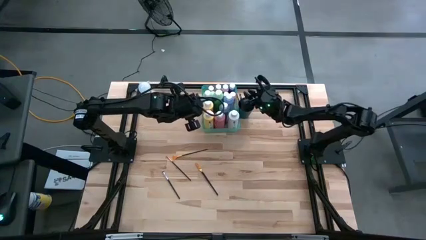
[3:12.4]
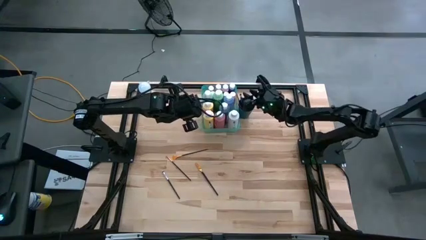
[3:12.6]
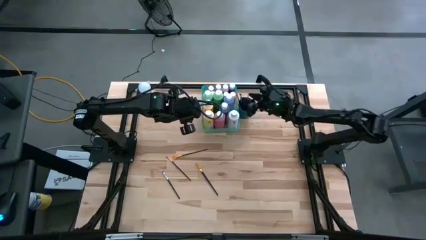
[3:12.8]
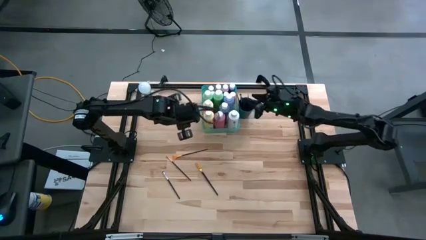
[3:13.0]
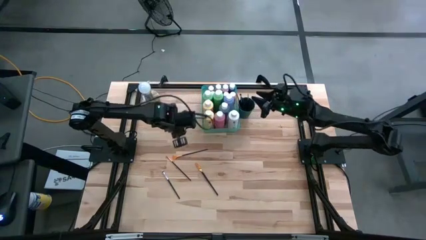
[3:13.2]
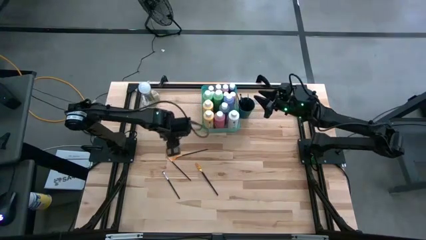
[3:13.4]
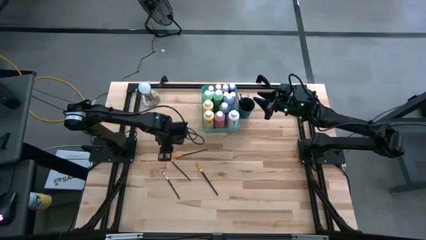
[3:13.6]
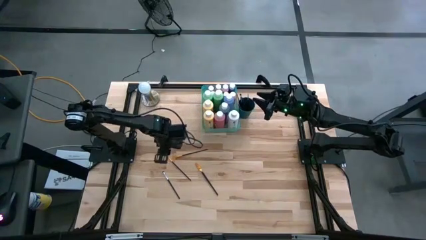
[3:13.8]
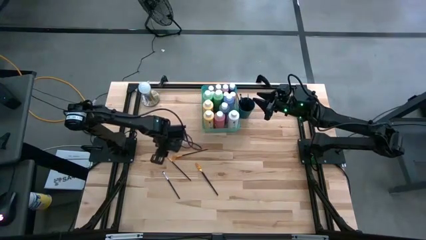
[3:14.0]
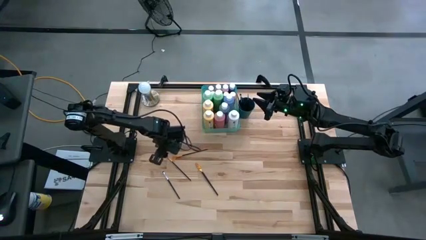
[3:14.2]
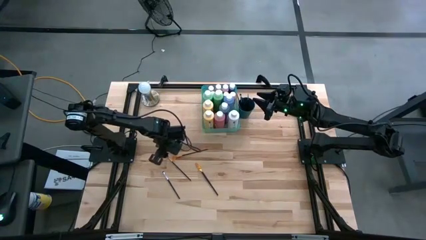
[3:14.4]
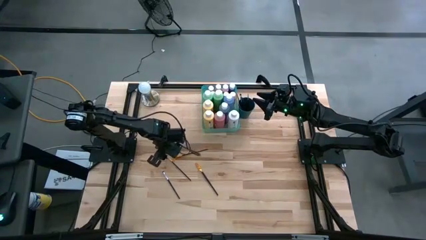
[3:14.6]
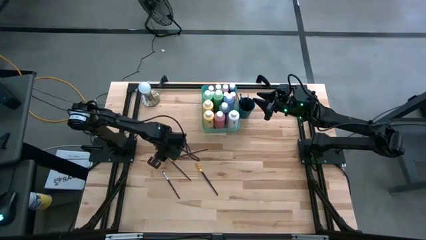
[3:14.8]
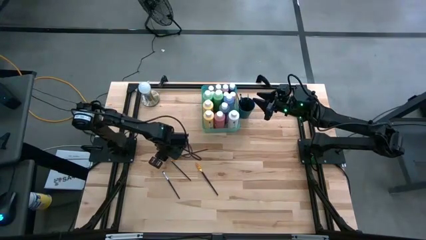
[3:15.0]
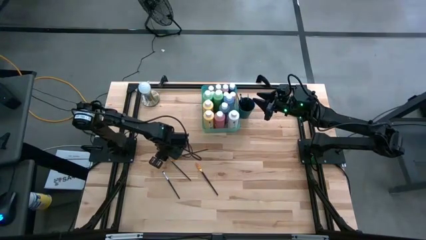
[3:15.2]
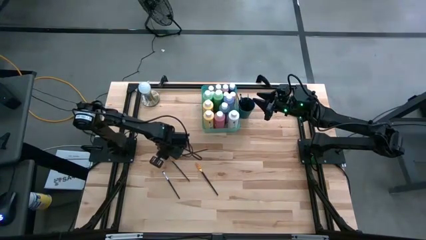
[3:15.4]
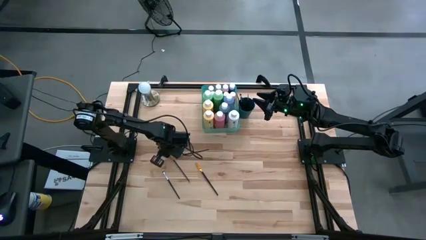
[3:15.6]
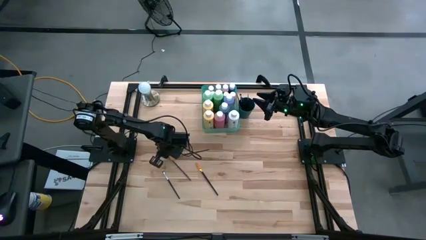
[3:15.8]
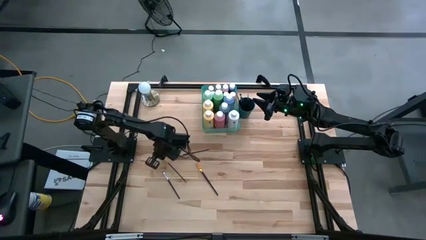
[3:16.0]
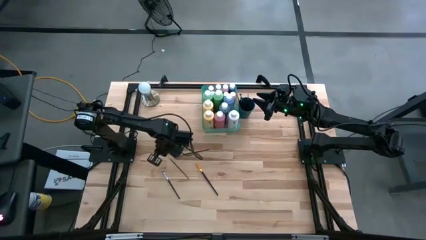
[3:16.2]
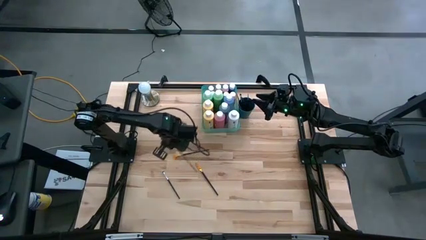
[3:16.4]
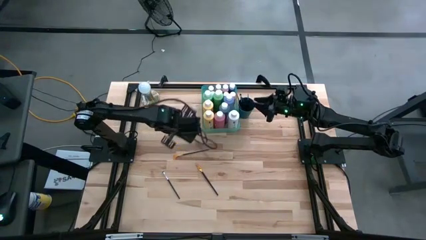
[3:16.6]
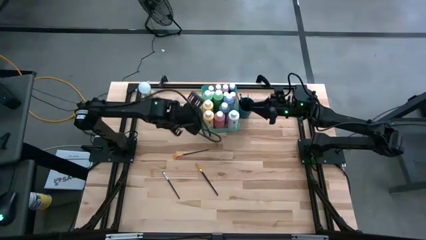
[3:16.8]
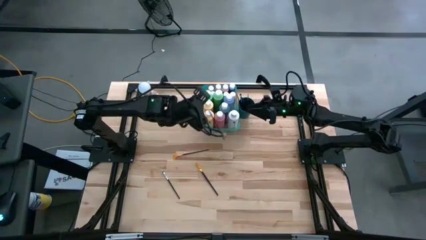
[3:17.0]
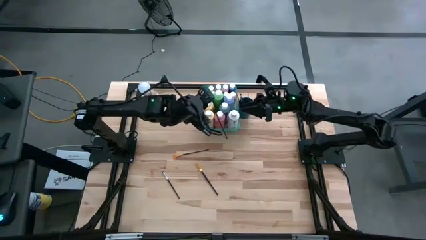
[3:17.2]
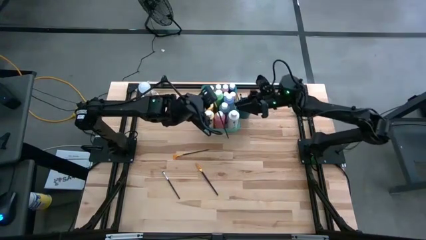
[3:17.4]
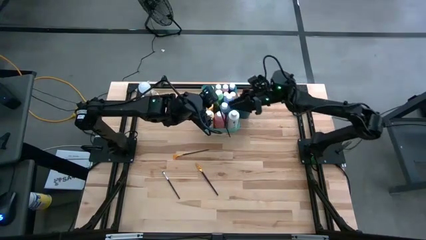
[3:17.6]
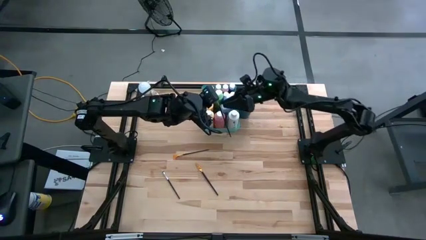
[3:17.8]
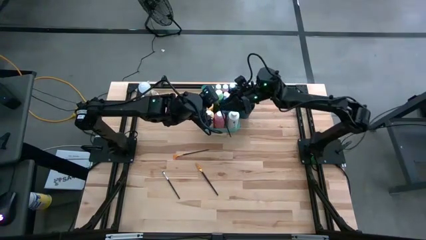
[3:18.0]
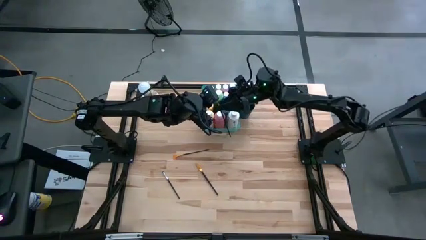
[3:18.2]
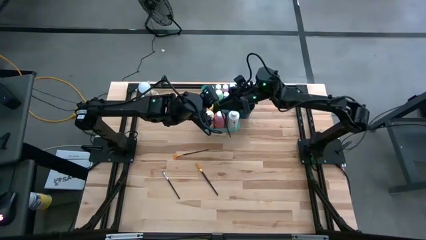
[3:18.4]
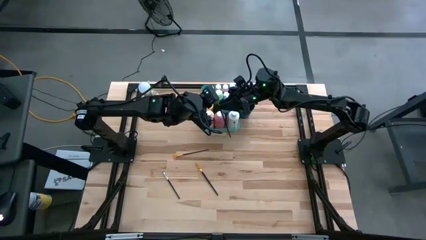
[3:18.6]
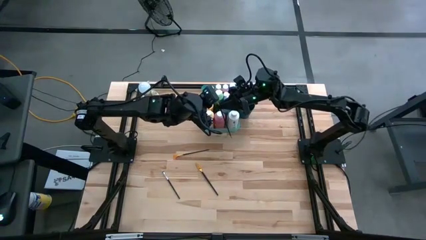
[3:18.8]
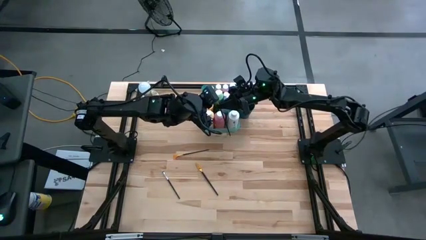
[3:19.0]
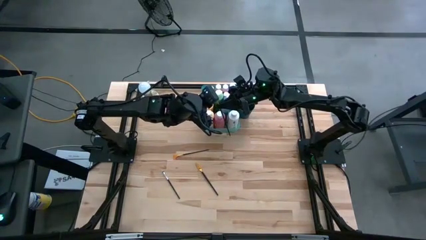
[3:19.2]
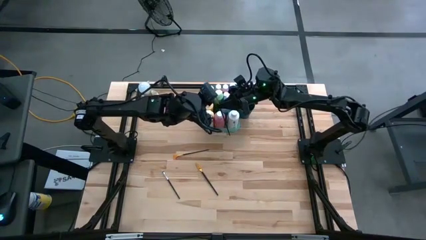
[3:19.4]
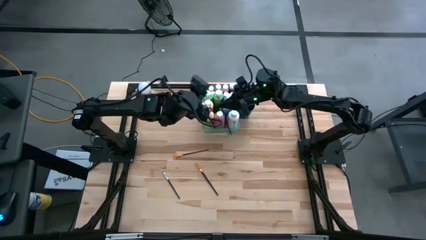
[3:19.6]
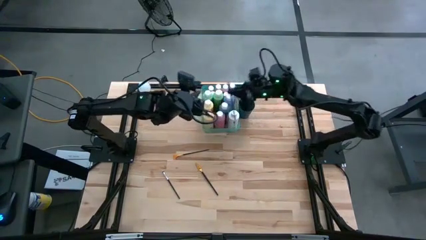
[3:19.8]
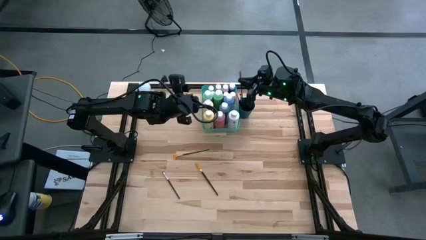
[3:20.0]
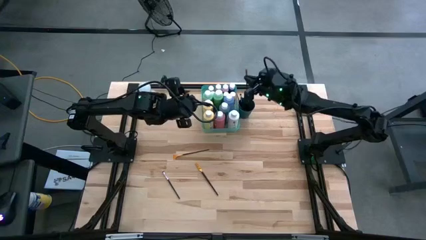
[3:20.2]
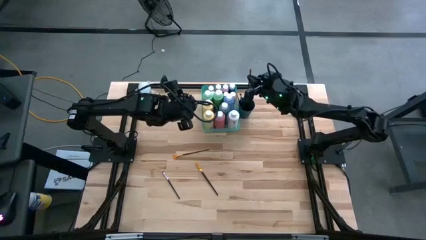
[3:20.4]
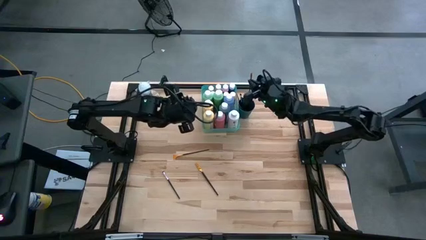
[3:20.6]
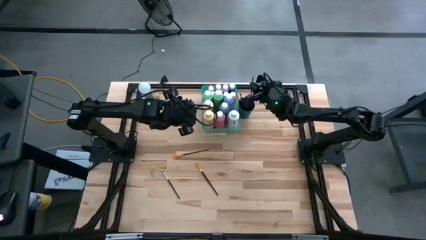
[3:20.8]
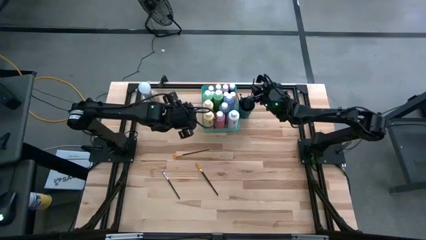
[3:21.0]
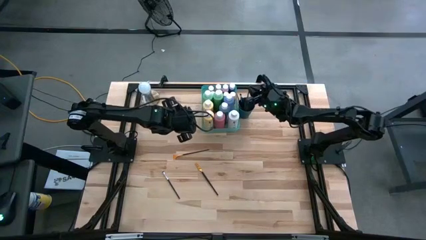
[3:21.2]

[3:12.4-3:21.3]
Task: Pick & Place Paint Supplies
Put the gold paint brush into the green cup

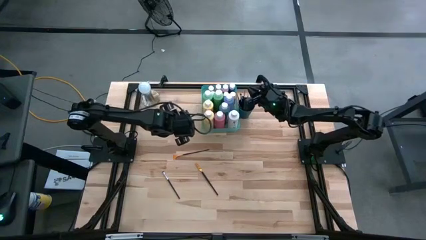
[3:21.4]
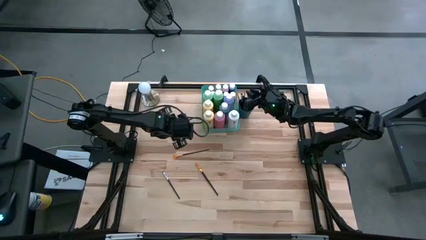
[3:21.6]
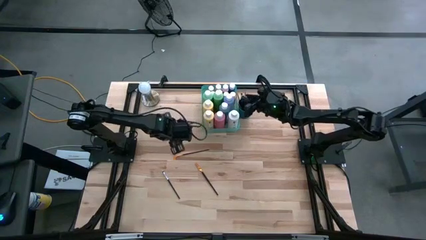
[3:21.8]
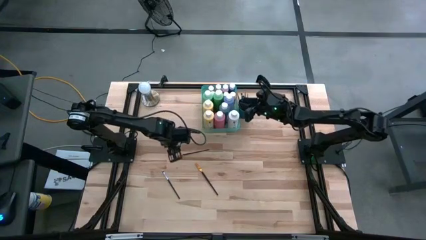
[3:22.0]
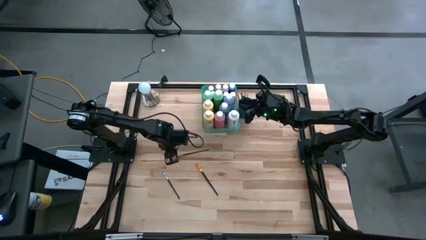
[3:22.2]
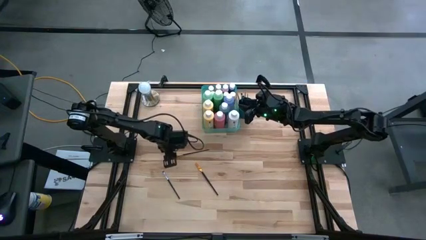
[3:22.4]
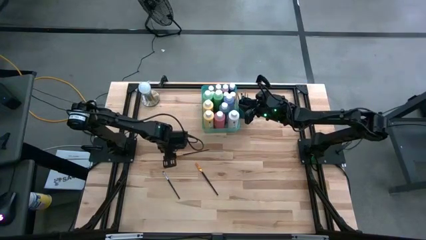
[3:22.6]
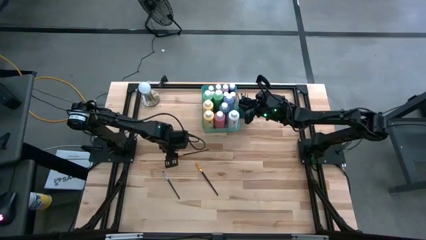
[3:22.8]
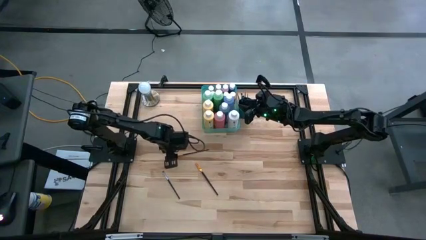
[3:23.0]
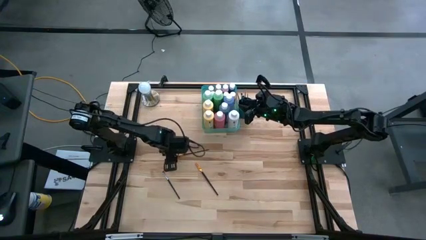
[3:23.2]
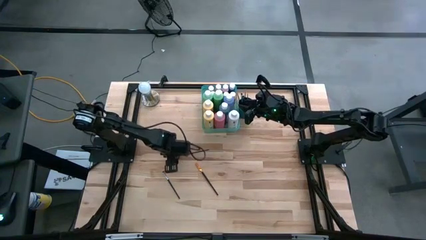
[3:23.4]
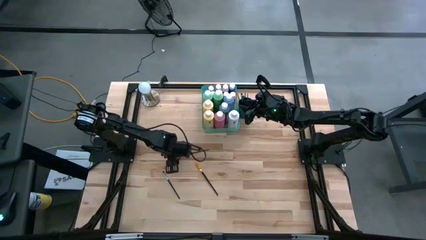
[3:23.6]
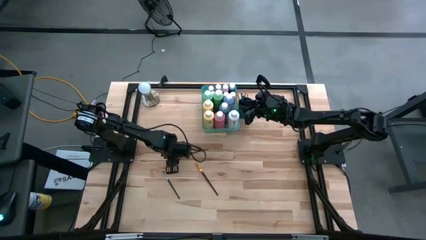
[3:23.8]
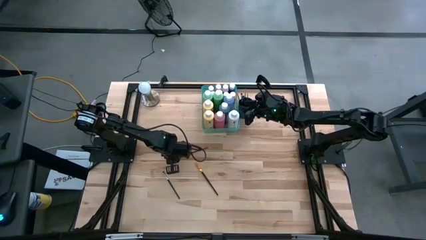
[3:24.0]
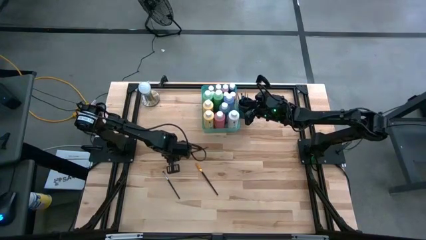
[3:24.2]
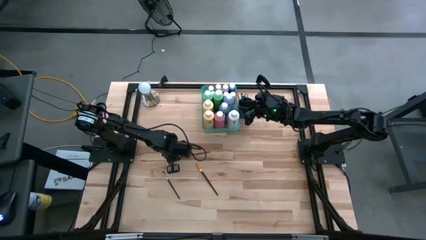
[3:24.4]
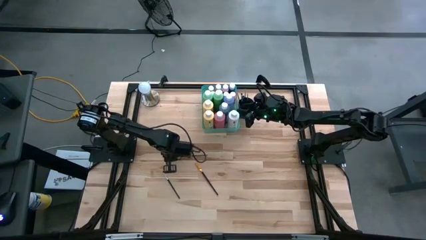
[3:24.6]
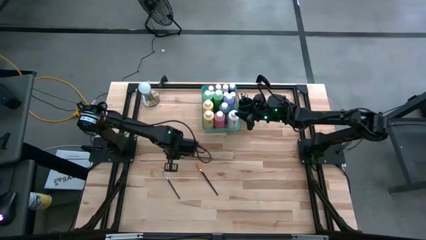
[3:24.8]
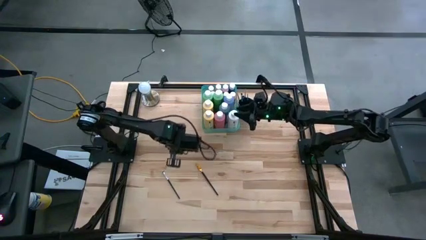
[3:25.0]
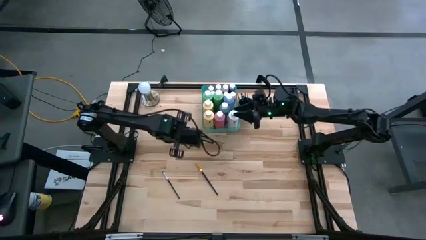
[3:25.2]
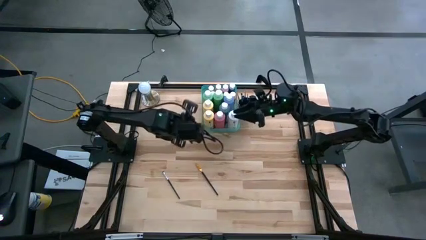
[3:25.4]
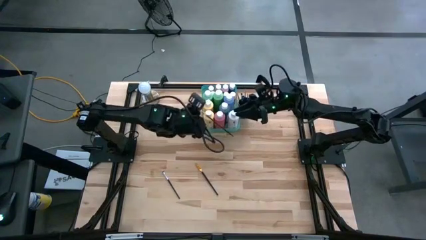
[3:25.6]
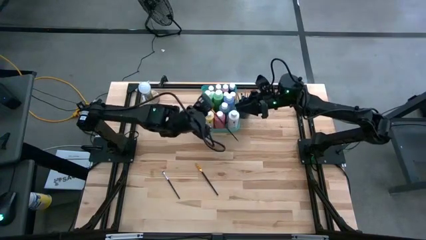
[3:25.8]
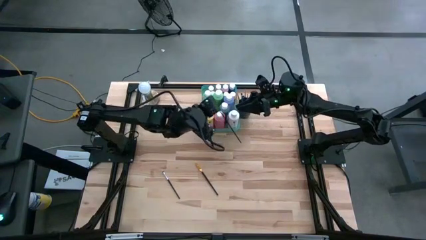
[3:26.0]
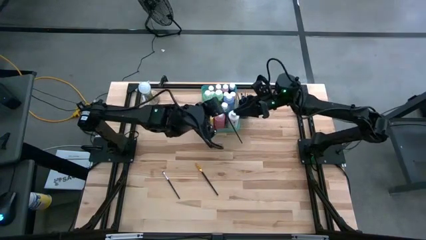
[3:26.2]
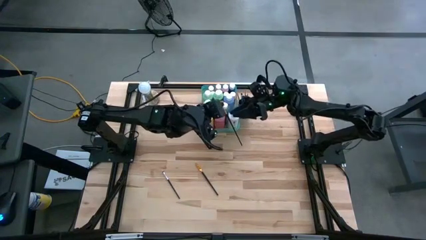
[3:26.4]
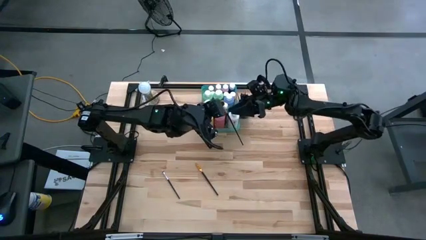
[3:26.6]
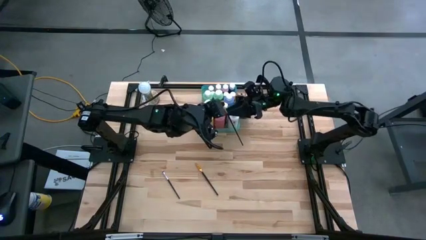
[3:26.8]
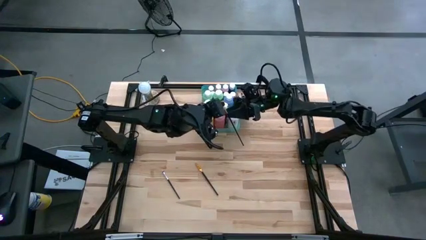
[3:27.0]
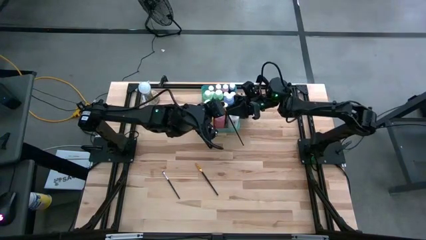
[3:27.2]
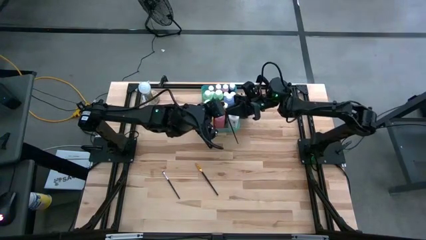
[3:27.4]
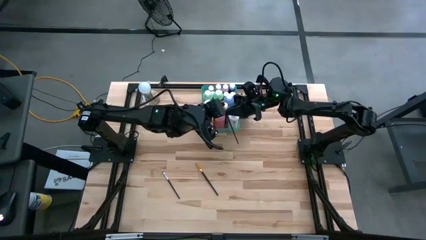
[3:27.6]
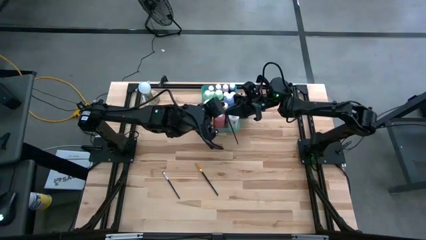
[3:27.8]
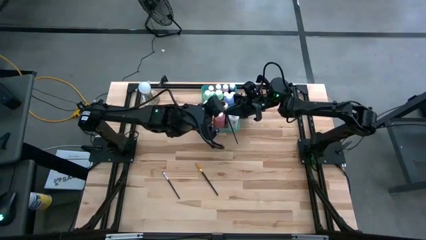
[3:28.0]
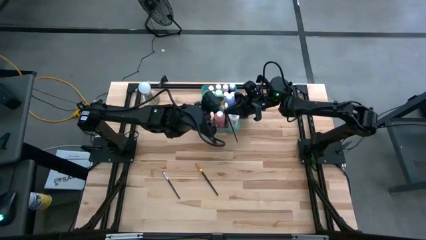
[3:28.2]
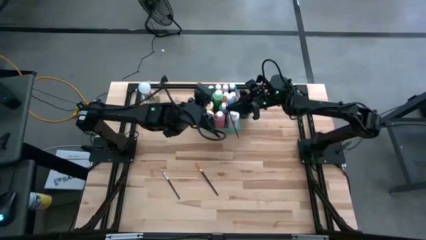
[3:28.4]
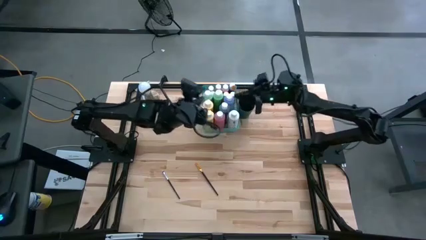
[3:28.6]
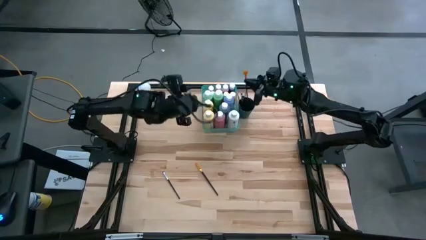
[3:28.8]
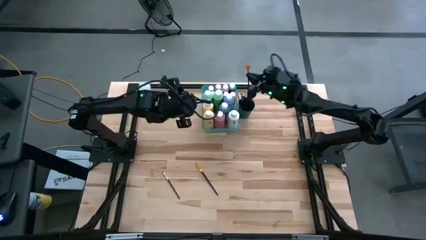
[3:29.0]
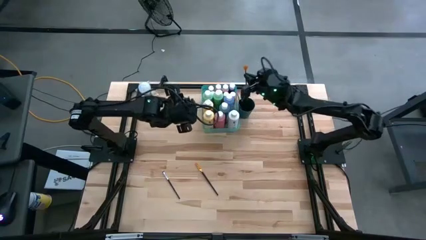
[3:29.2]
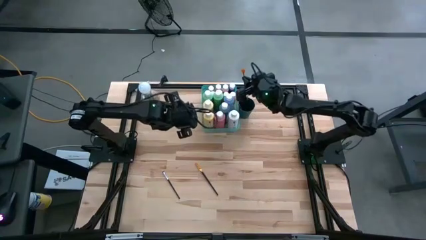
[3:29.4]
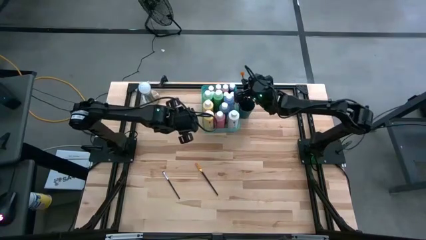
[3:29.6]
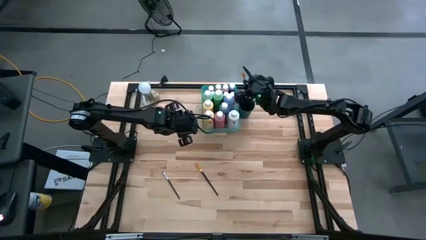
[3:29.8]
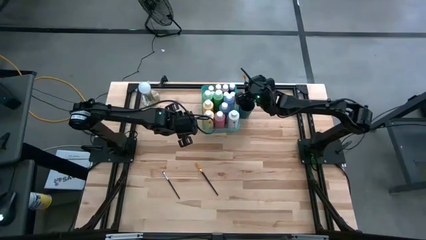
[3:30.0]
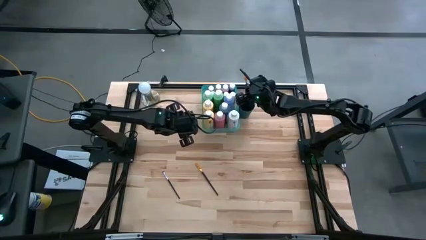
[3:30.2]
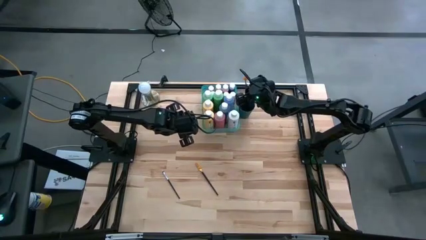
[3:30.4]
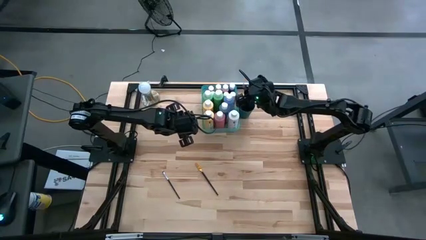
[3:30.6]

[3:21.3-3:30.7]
Put the gold paint brush into the green cup
